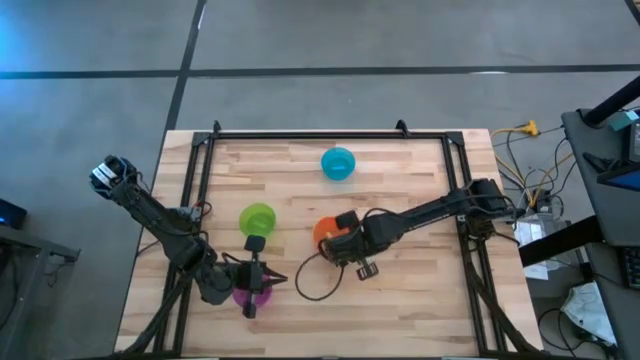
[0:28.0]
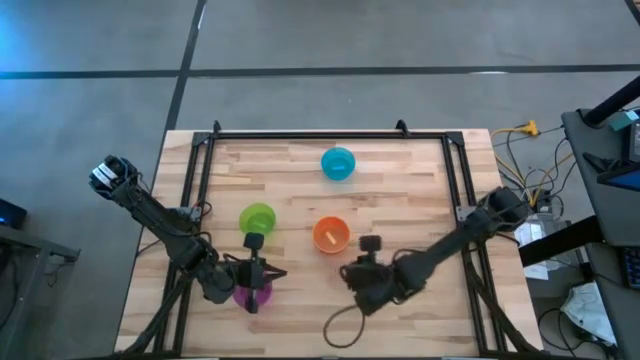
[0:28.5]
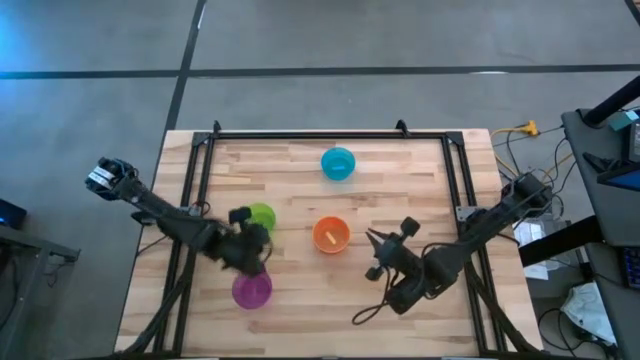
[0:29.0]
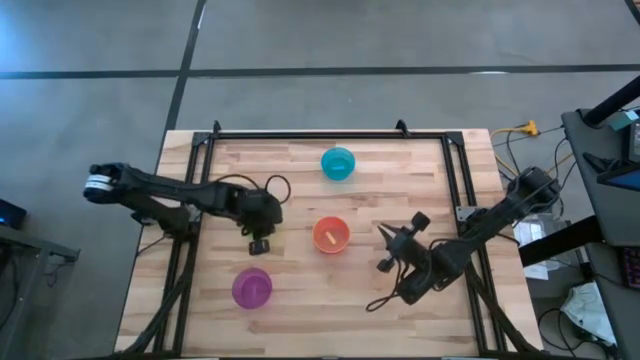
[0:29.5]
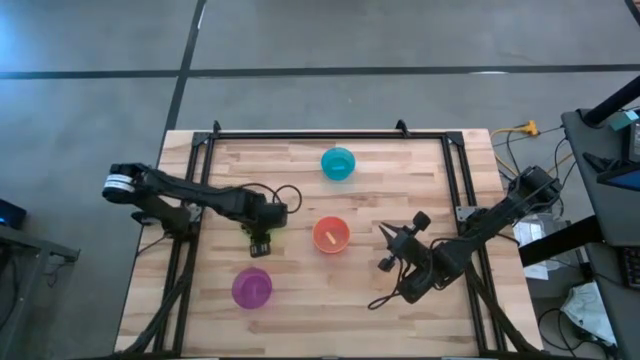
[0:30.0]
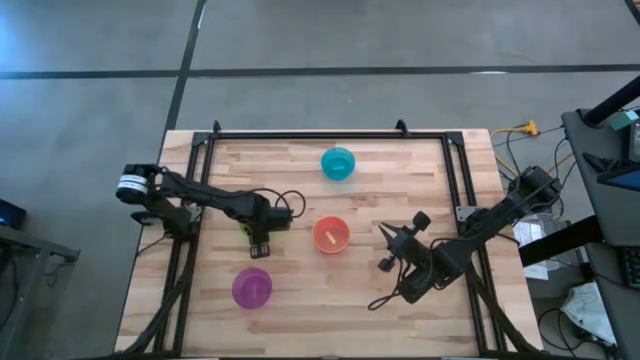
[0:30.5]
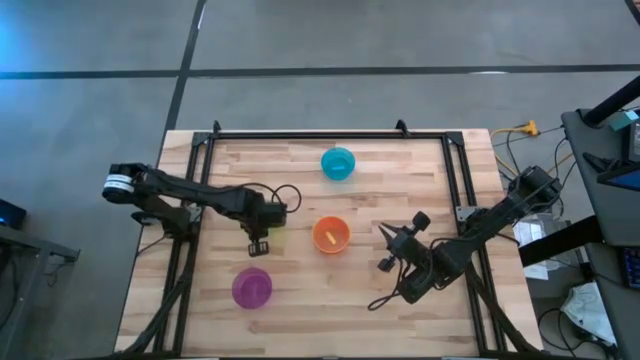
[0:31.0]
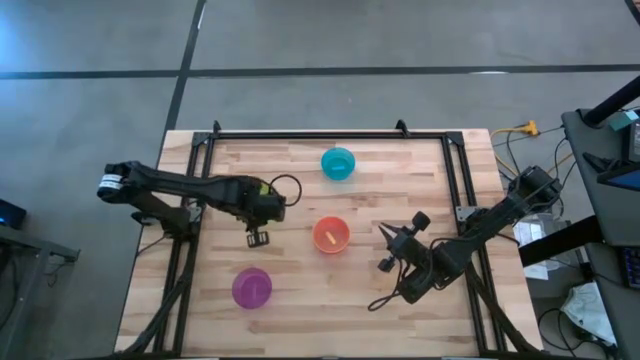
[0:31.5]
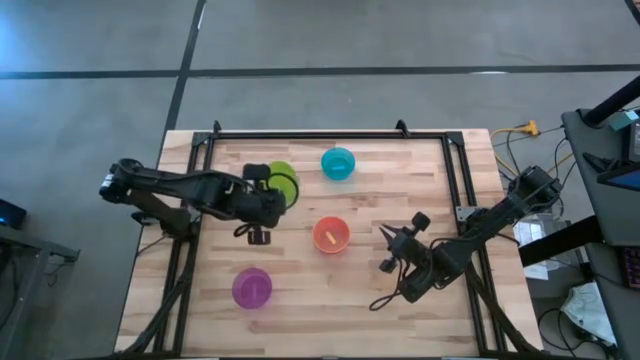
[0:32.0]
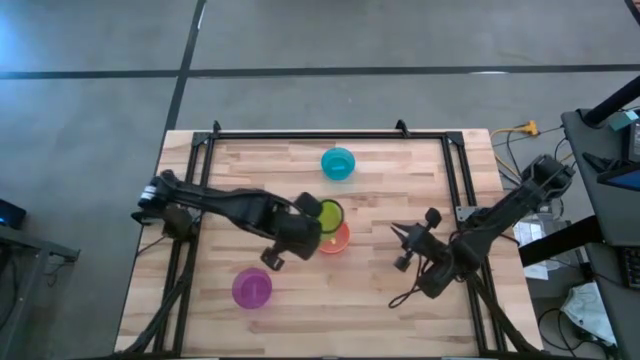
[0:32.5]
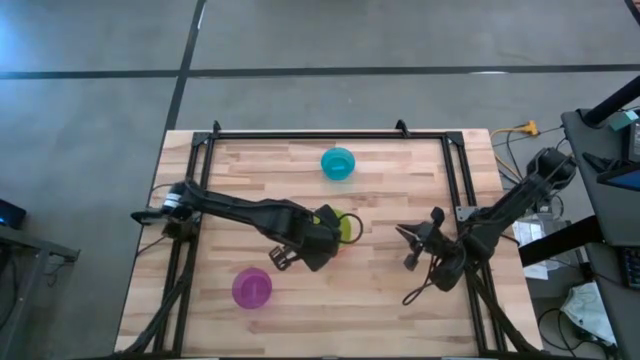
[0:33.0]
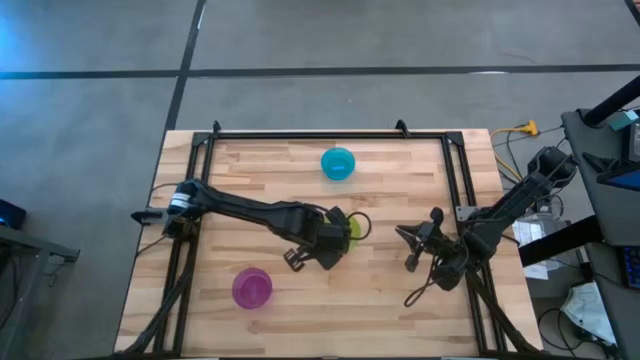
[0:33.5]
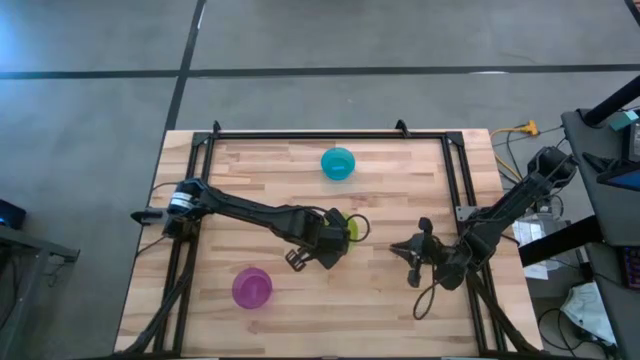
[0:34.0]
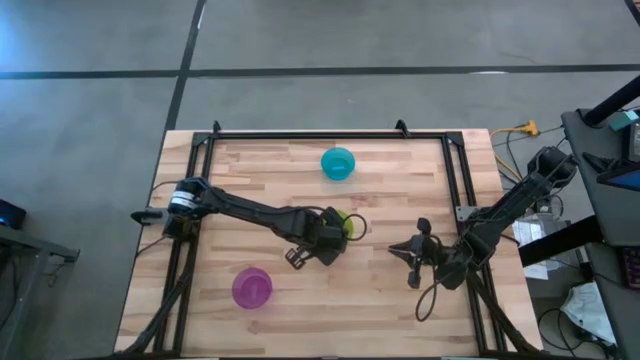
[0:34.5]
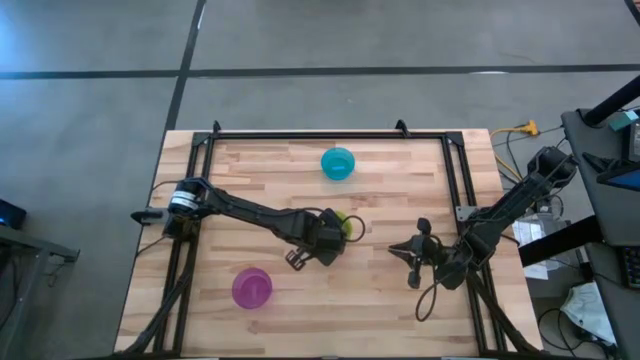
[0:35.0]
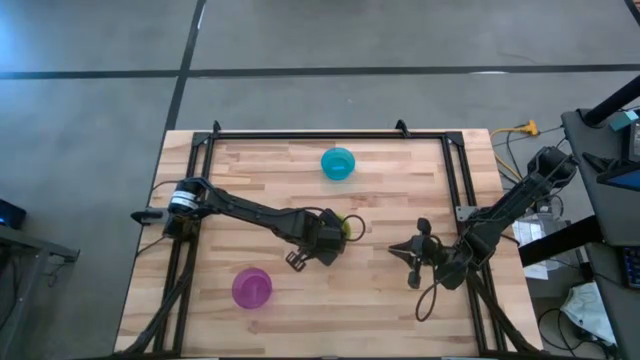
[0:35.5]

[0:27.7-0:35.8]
Task: Nest bowls inside each other
Stack the green bowl on top of the yellow bowl

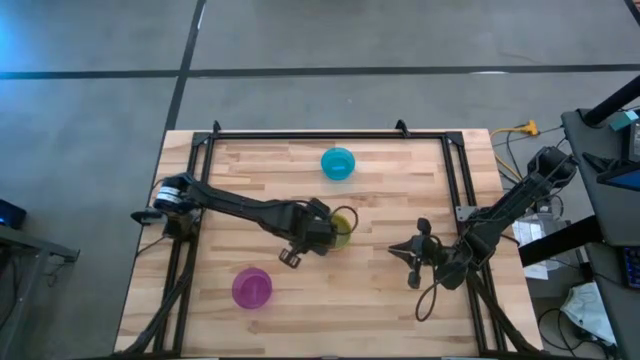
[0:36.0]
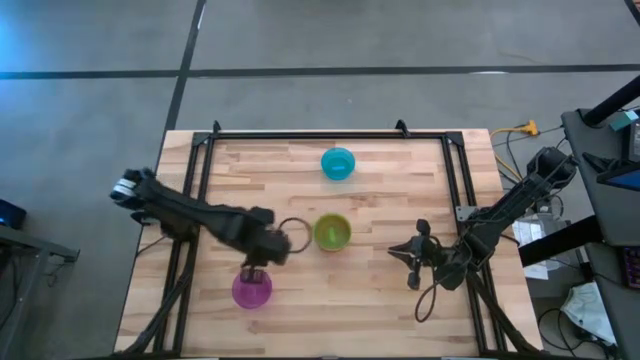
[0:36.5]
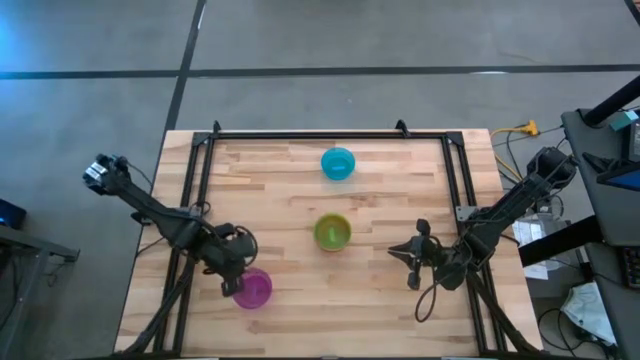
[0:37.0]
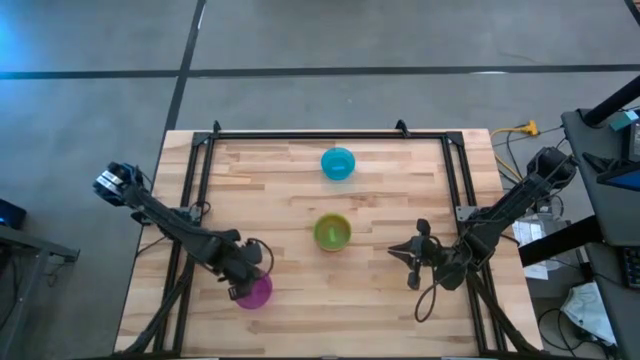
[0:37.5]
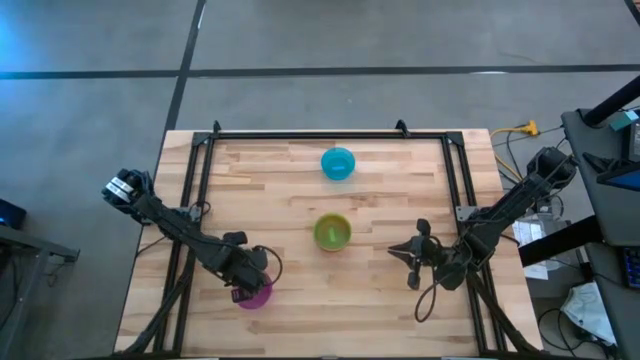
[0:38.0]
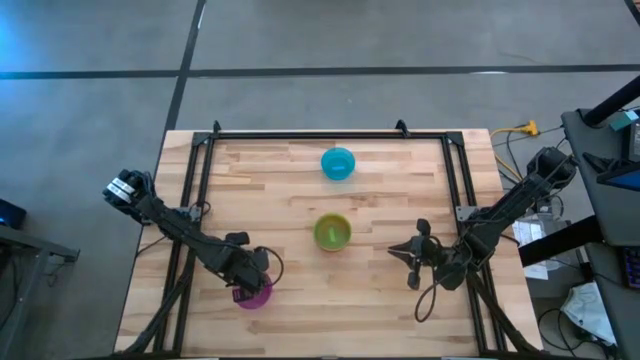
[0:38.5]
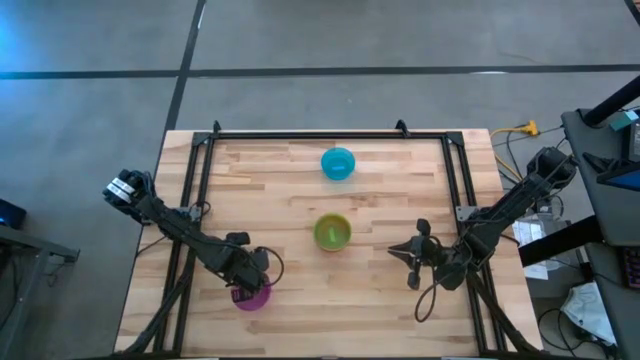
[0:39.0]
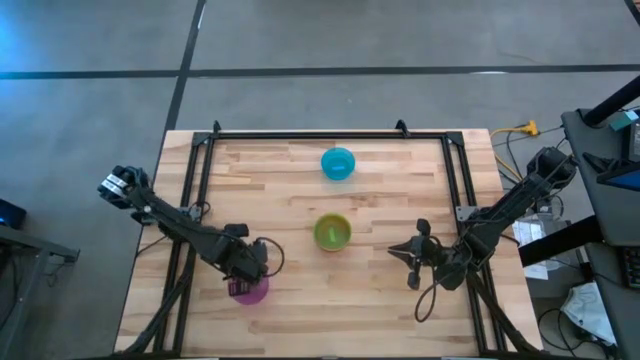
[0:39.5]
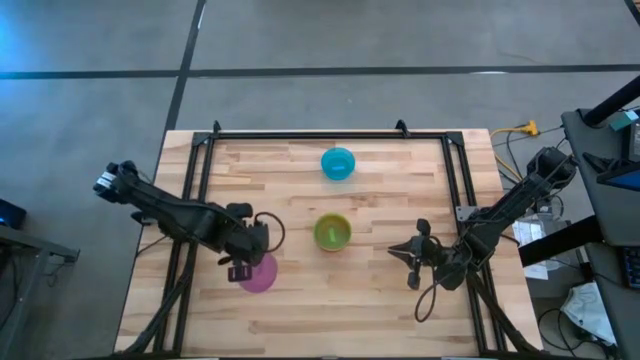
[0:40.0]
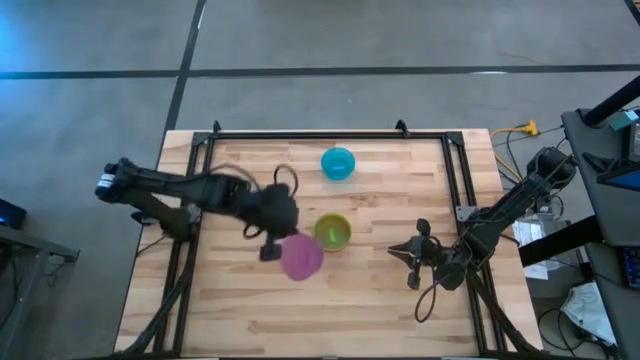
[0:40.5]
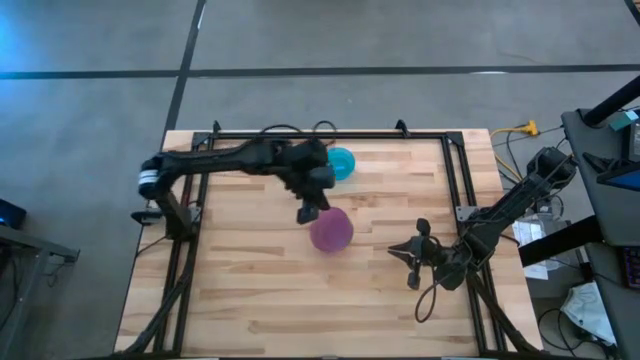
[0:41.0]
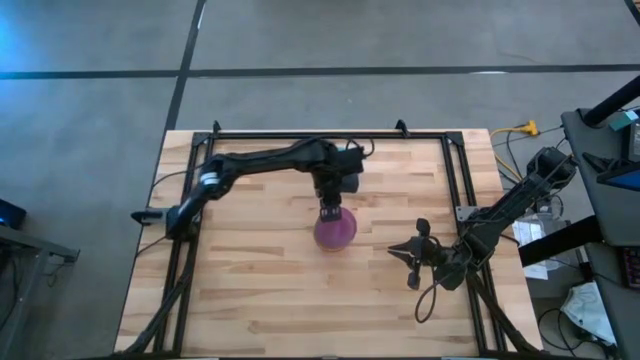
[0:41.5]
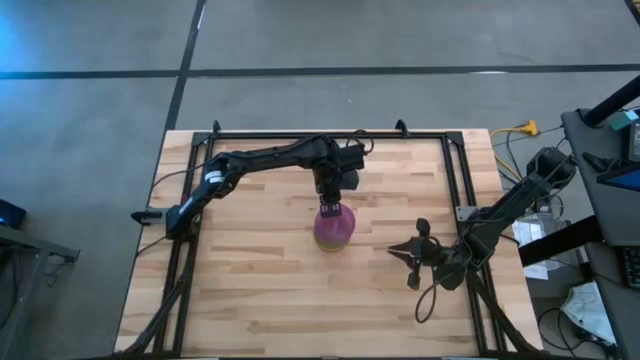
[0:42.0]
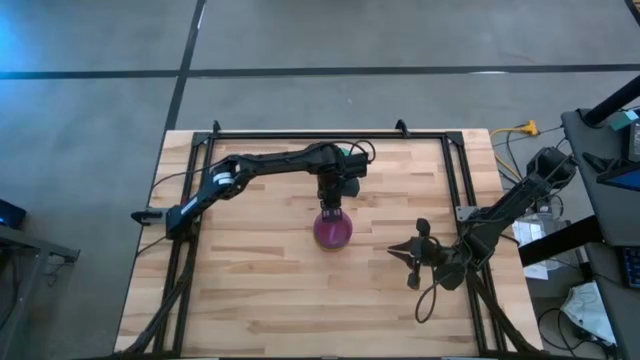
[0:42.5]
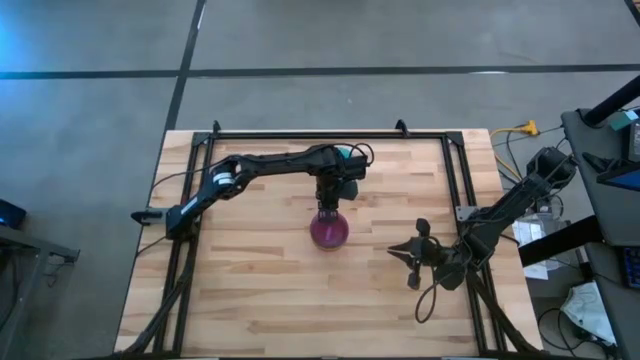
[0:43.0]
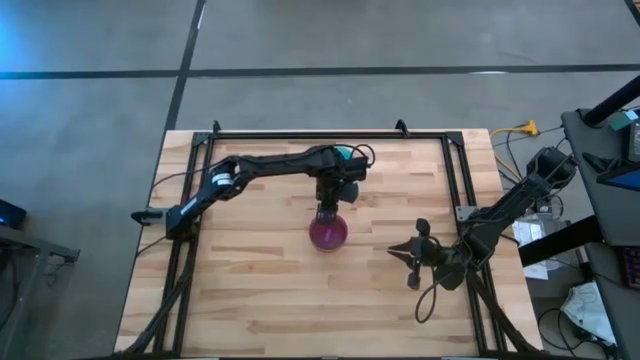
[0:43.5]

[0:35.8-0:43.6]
Stack the purple bowl on top of the green bowl

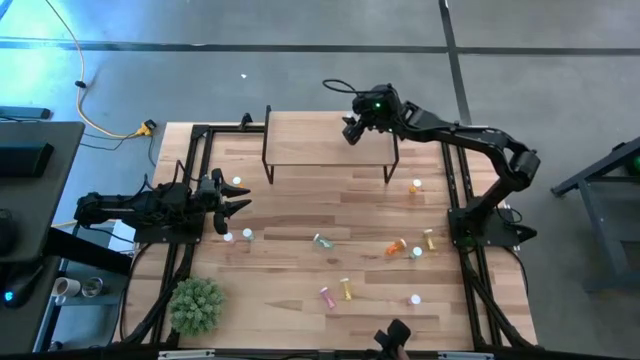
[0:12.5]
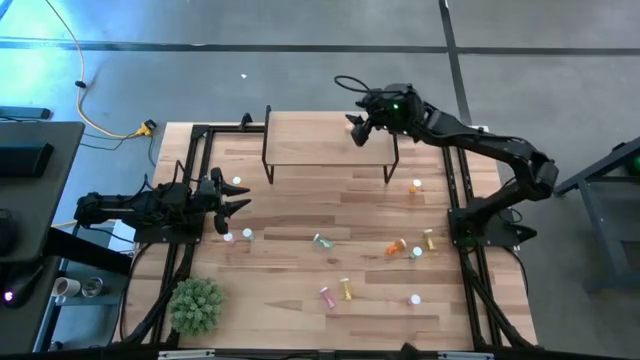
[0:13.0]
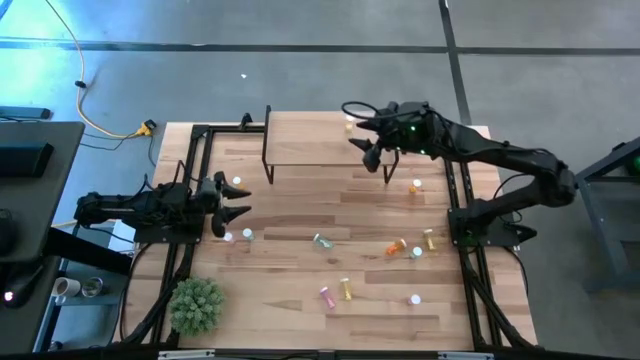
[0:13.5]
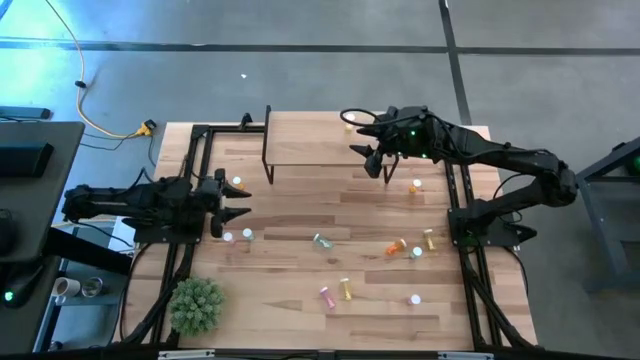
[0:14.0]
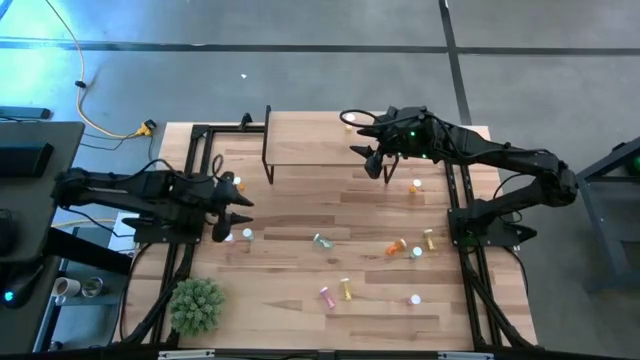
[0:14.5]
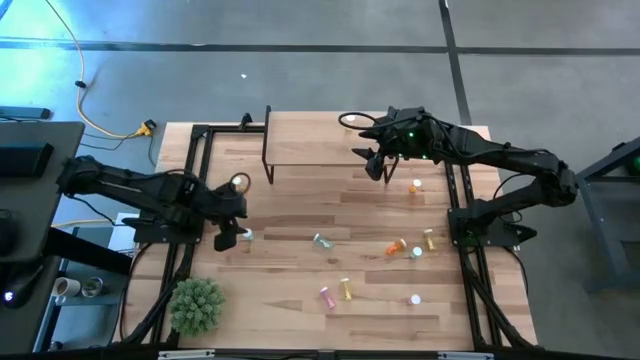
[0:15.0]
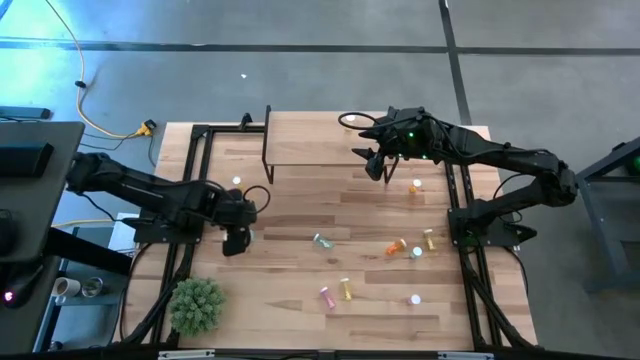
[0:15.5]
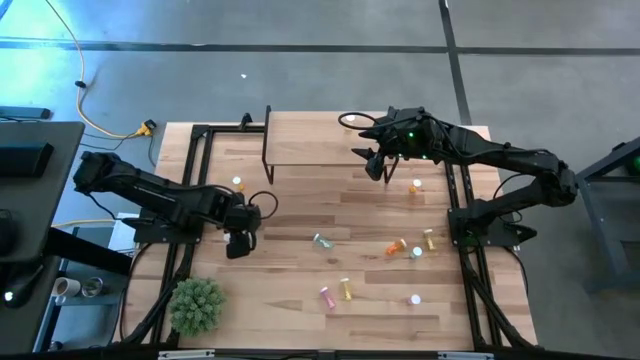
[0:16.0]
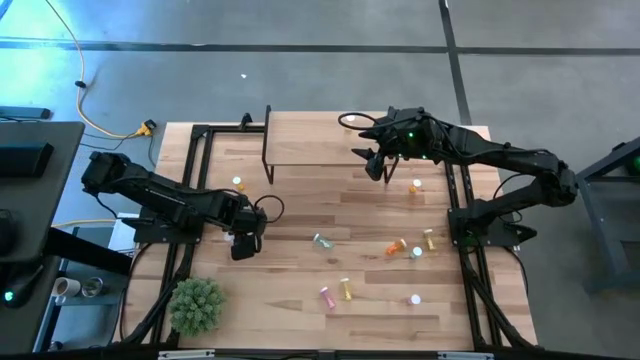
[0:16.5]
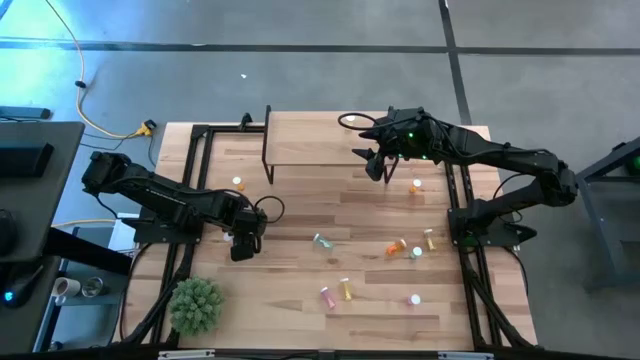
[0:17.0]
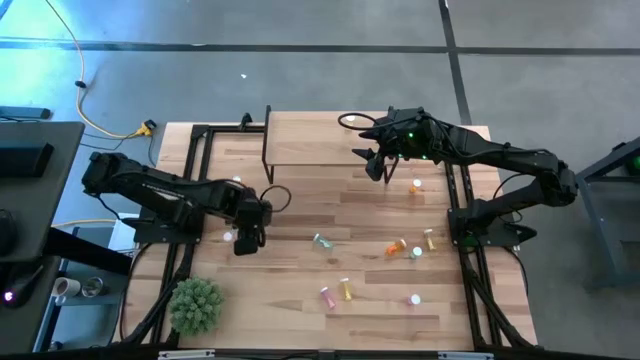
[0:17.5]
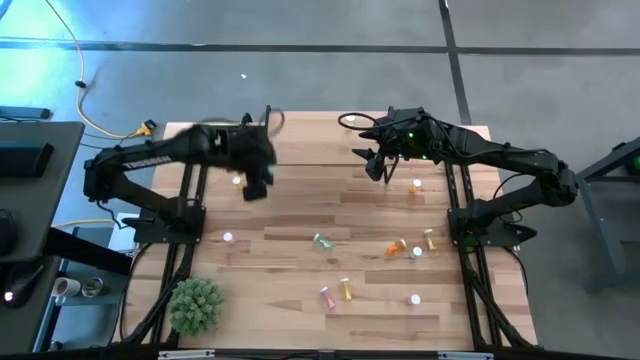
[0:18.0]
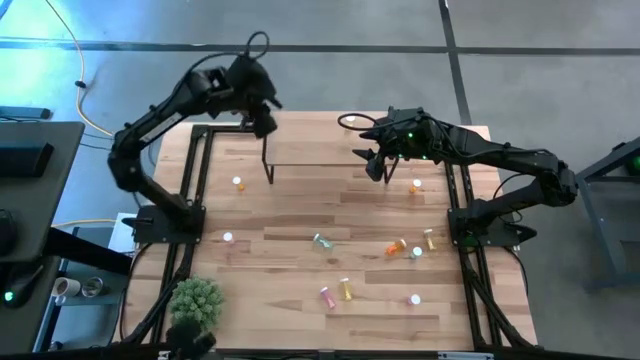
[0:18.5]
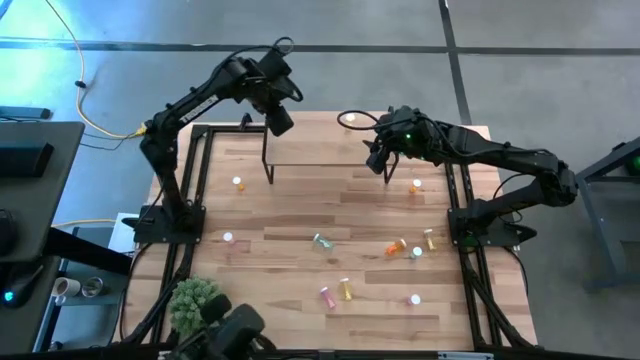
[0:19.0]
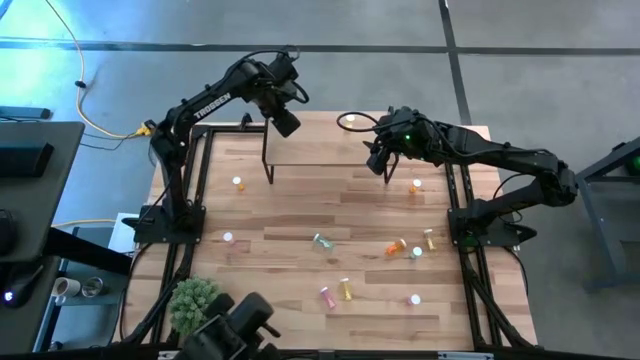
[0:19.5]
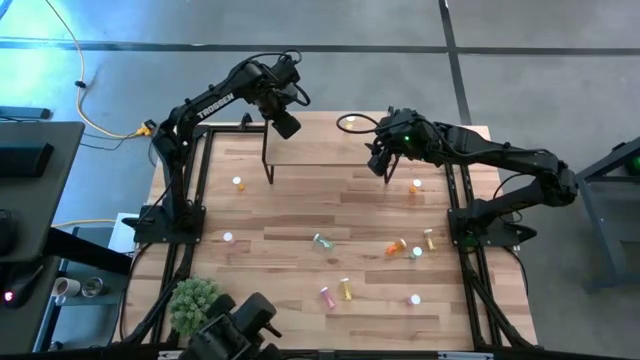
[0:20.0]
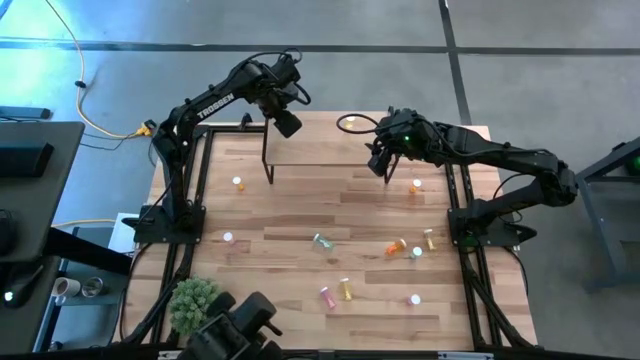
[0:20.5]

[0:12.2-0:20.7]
Task: Pick and place medicine bottles onto shelf by color
Put the left blue pill bottle on the shelf
